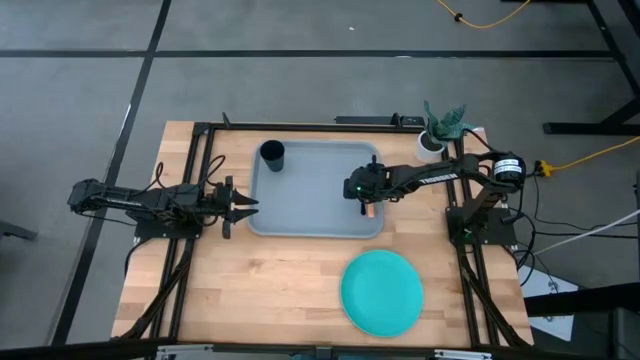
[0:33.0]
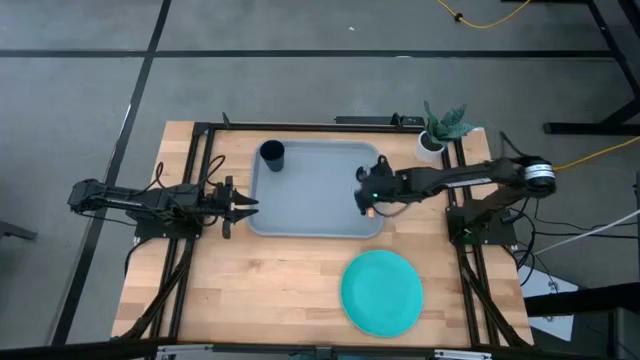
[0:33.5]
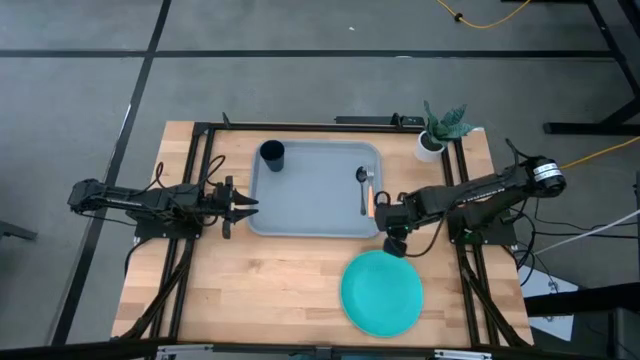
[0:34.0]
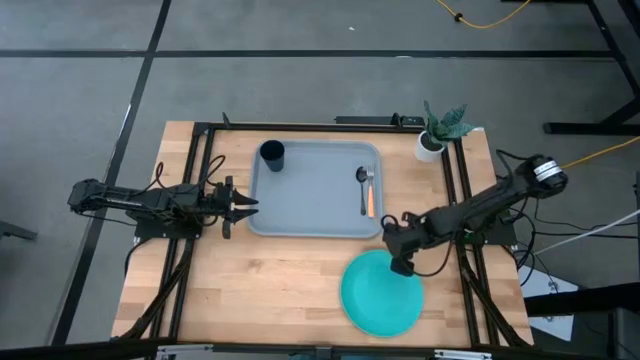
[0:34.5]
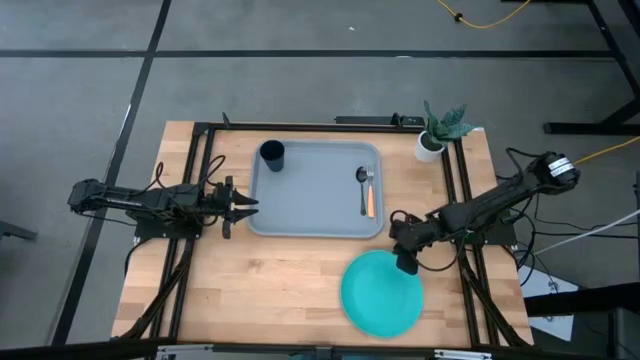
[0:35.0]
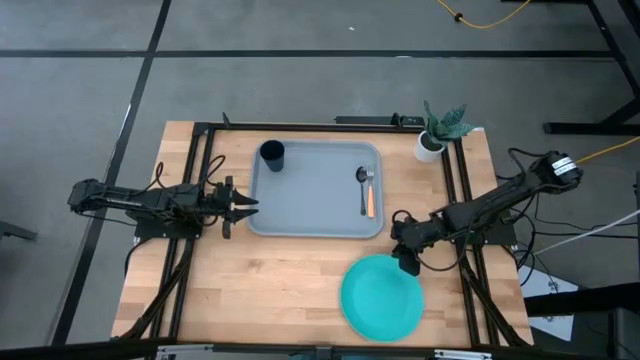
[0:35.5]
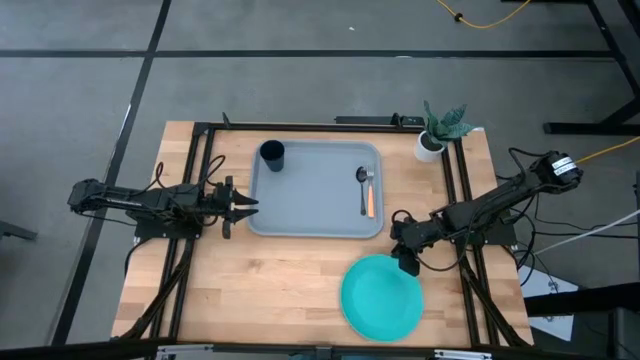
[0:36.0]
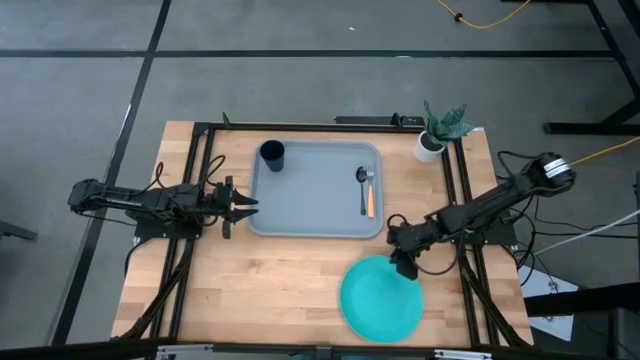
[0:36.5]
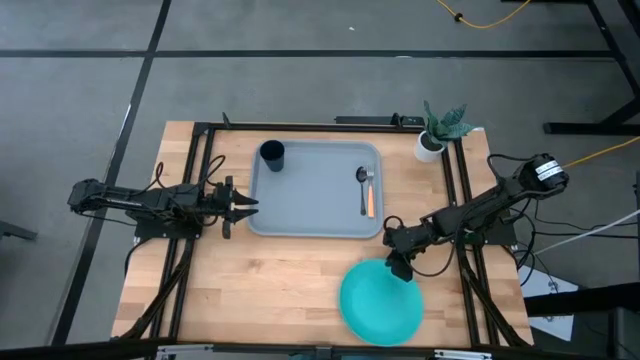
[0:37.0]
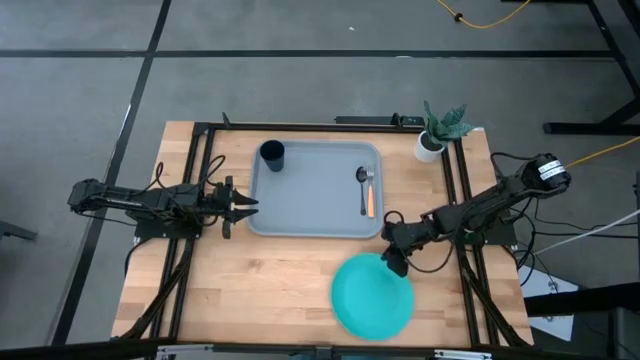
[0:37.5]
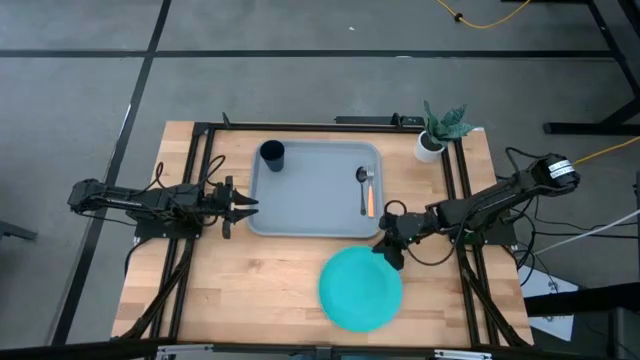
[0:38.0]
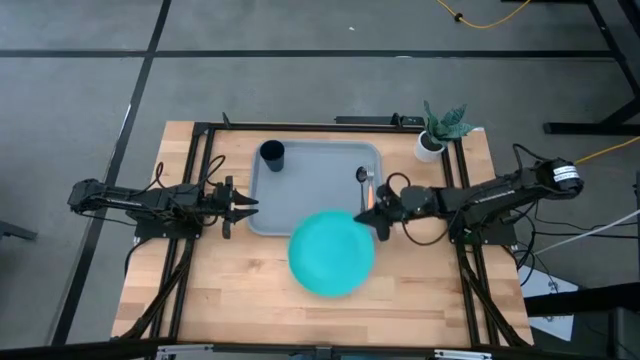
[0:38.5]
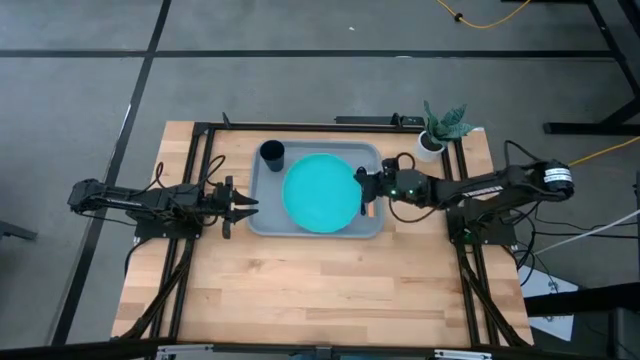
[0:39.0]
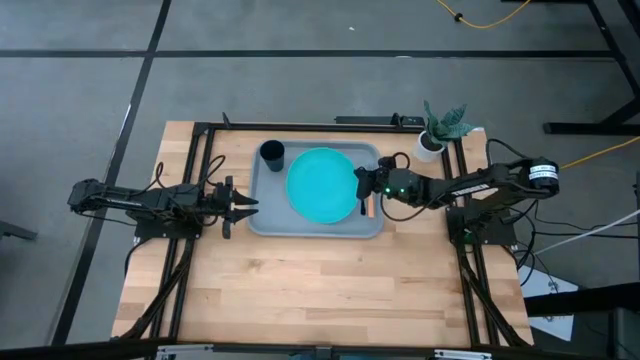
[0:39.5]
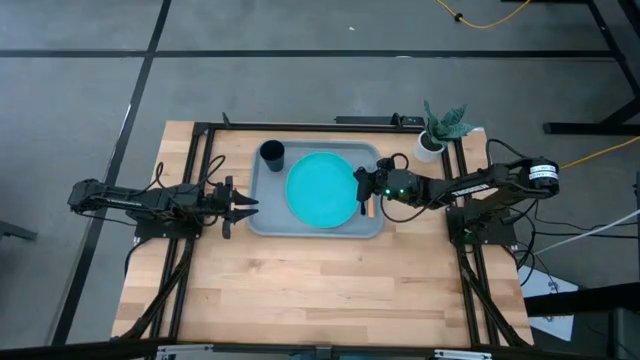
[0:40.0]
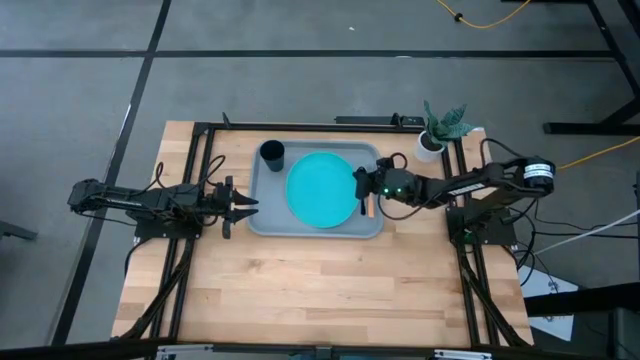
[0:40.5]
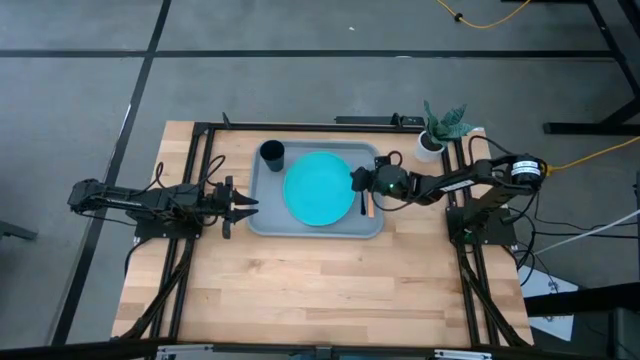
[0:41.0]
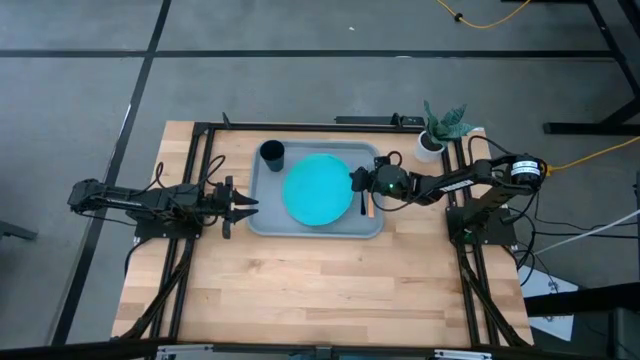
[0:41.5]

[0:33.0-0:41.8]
Task: Pick and place plate/cup/fork/spoon on tray
Put the blue plate on the serving tray to the left of the black spoon

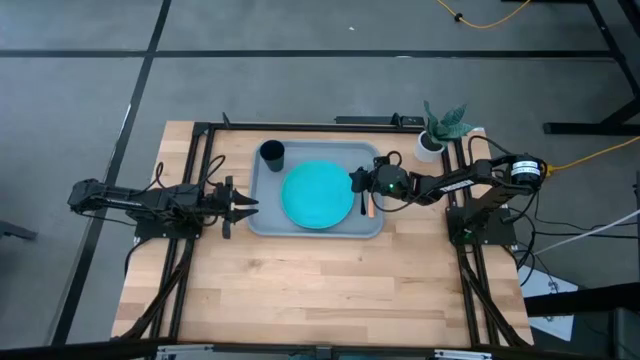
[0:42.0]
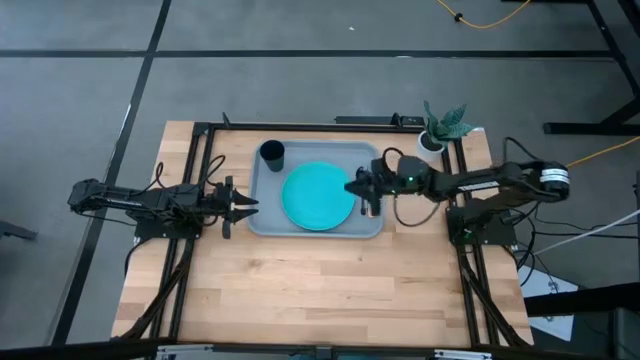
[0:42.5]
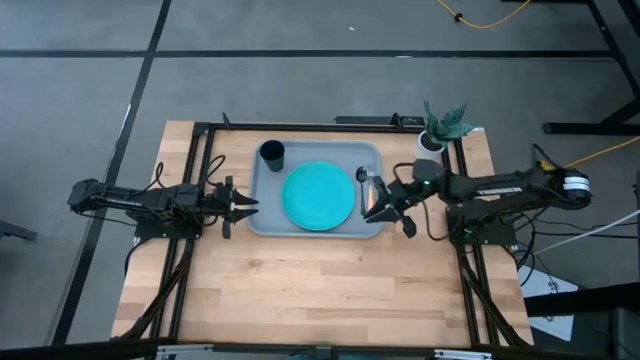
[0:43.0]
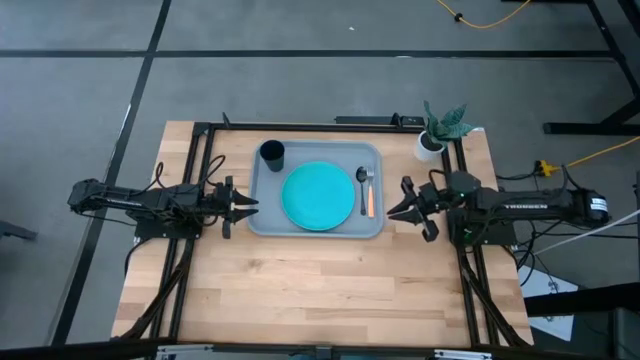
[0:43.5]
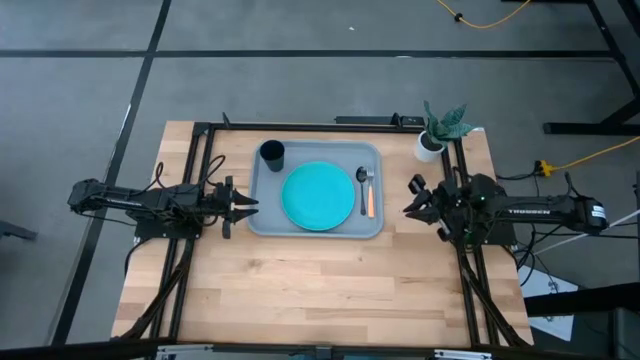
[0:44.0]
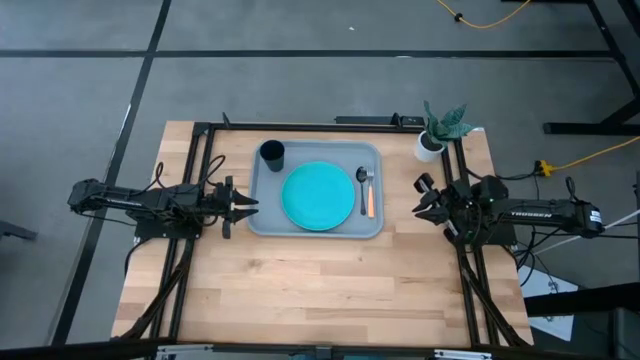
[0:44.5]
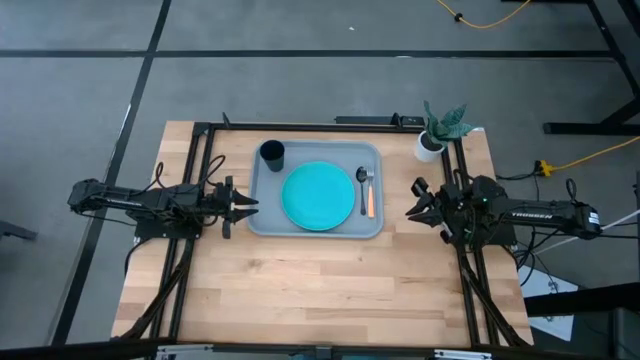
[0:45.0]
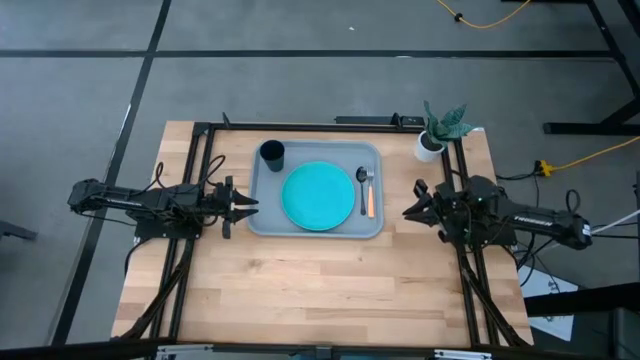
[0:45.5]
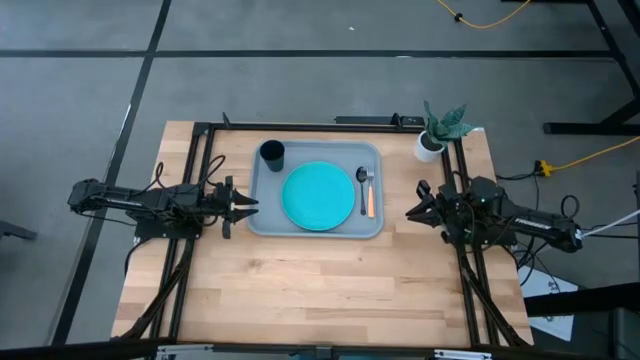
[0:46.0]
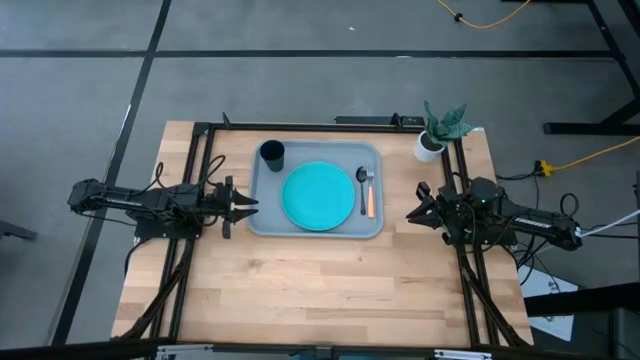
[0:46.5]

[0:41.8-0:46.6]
Return to Home Position

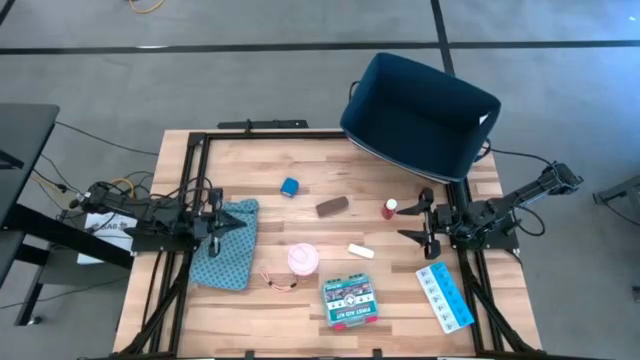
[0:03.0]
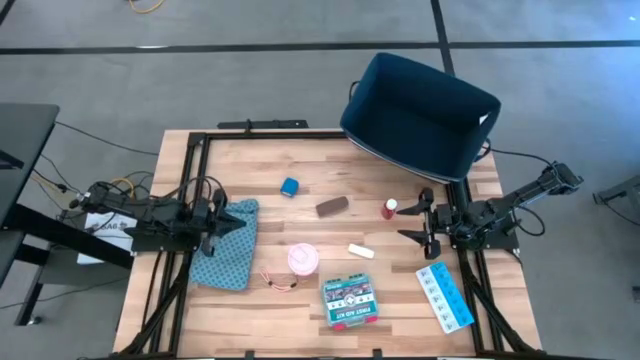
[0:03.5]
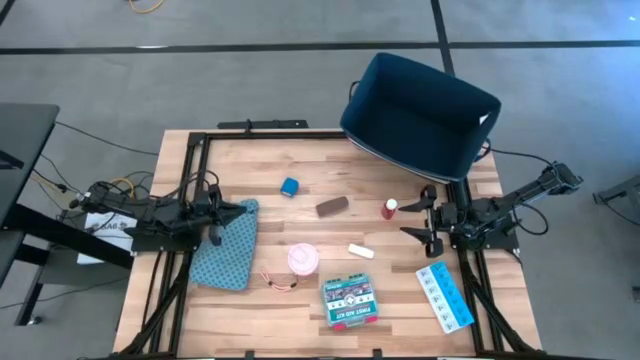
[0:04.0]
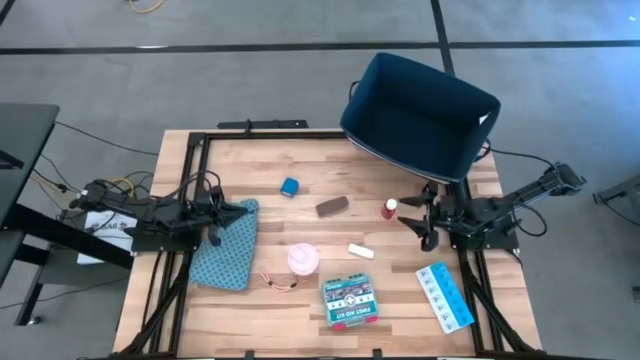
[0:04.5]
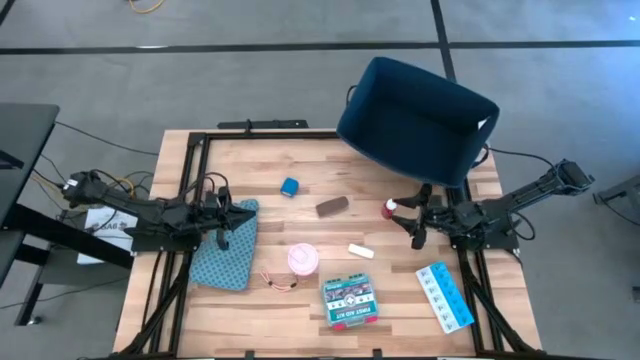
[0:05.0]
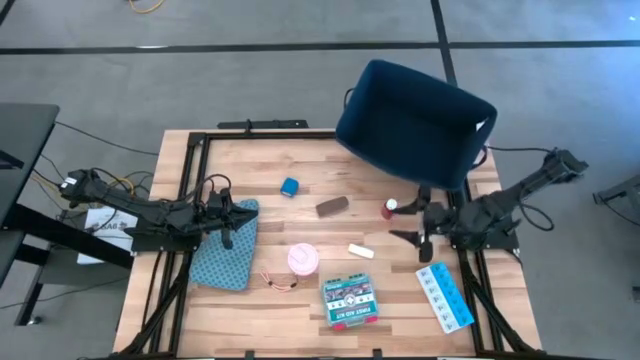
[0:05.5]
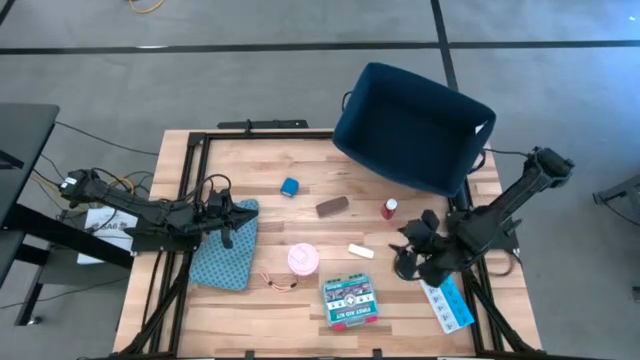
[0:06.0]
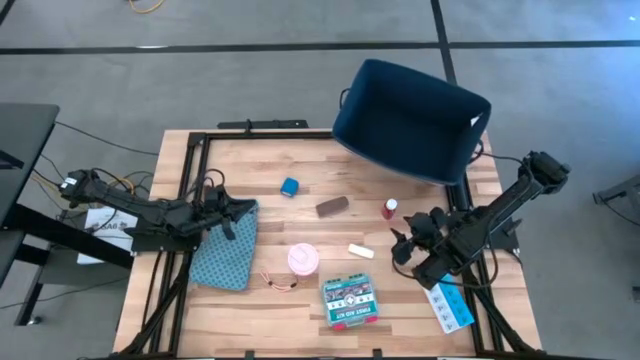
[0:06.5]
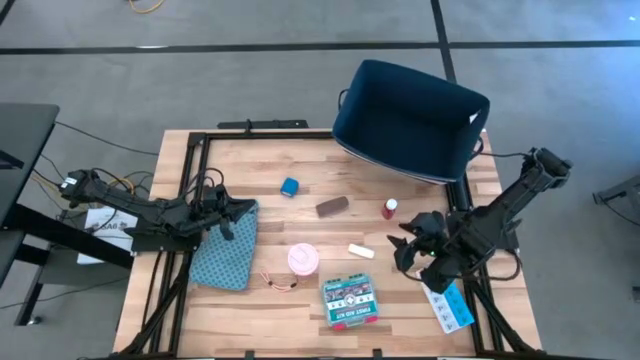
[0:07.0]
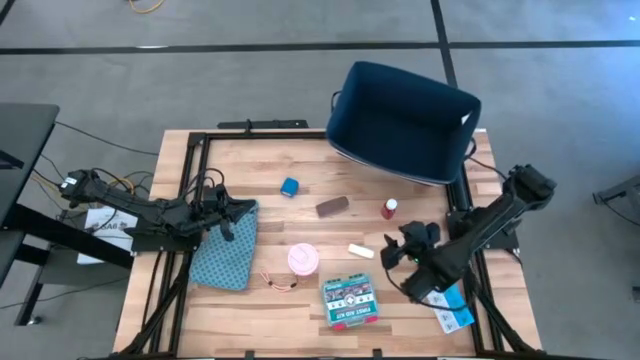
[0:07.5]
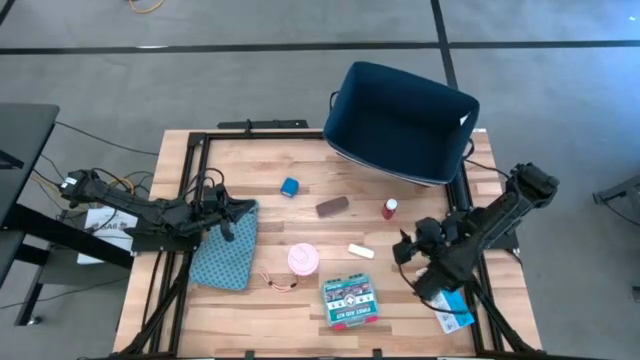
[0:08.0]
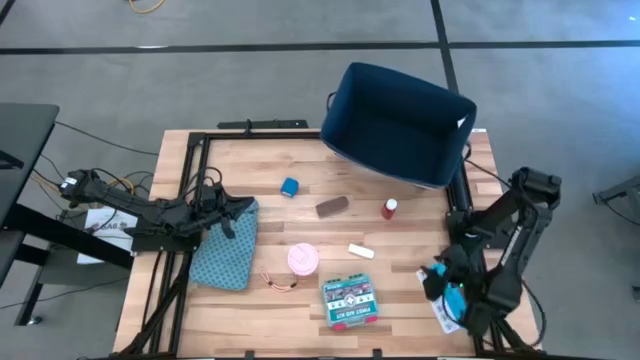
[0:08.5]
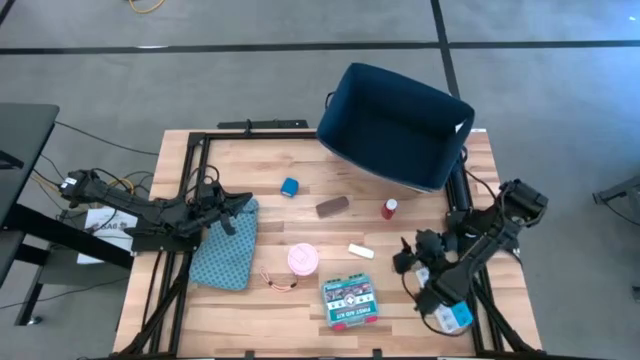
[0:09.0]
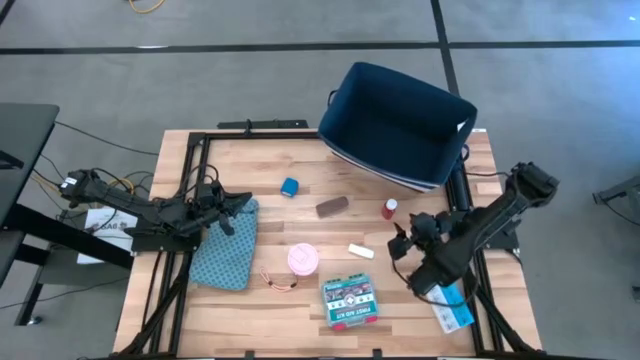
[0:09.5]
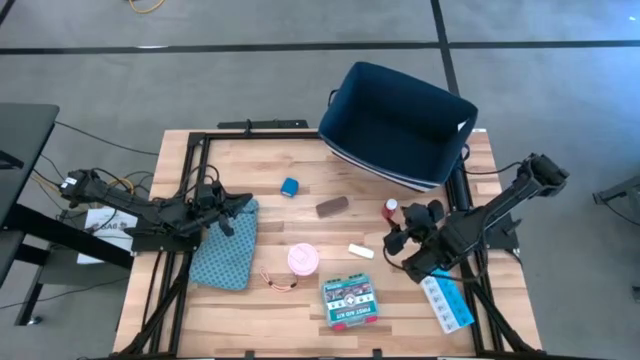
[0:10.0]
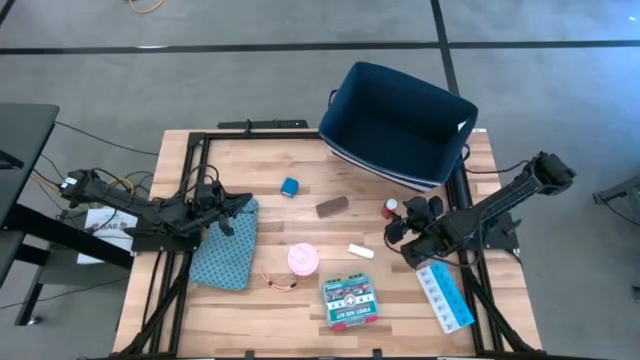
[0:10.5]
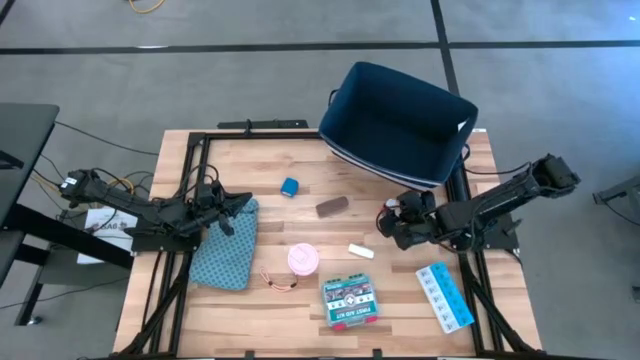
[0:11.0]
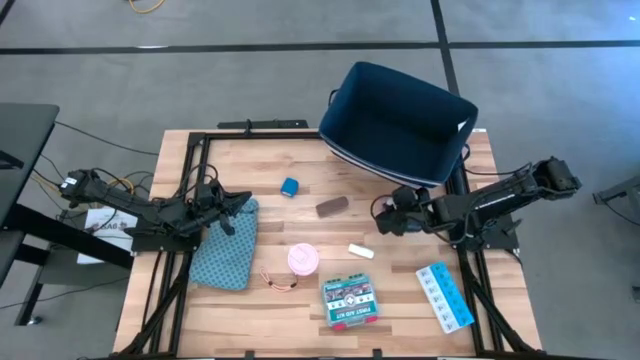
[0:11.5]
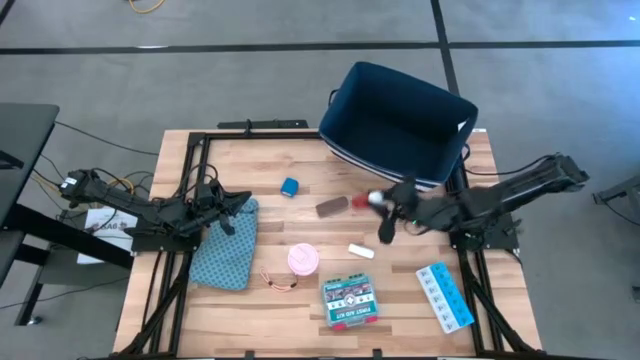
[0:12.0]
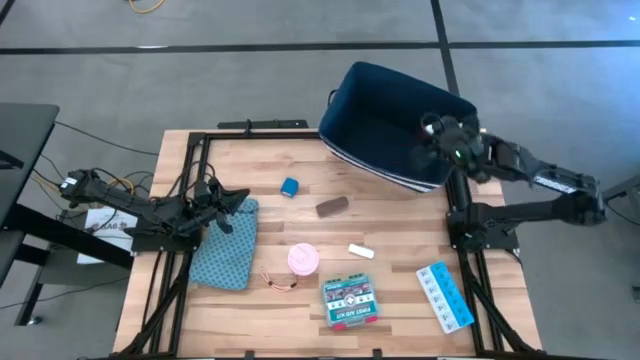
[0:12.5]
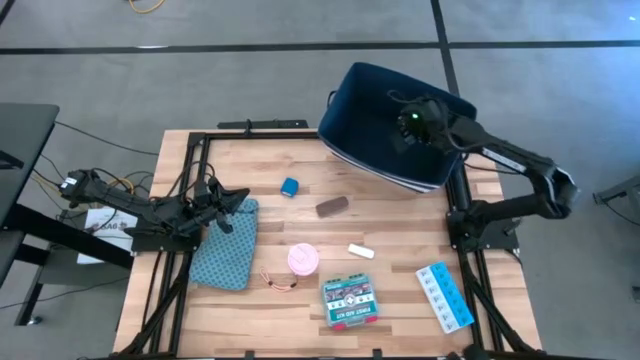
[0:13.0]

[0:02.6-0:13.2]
Task: Pick & place medical supplies in basket/bin
Put the red medicine bottle into the blue organizer bin
